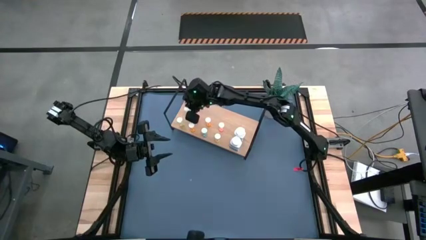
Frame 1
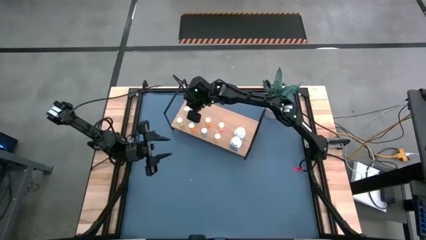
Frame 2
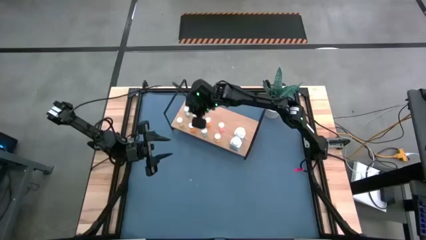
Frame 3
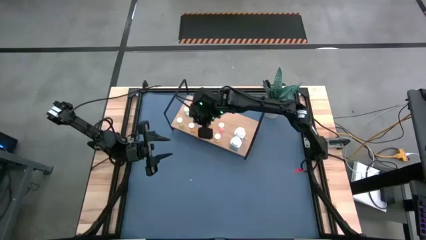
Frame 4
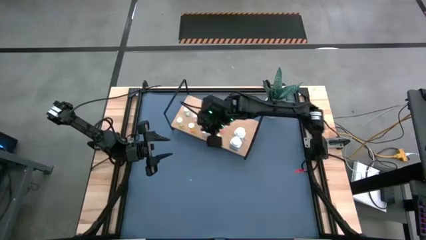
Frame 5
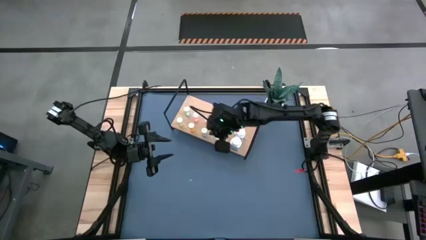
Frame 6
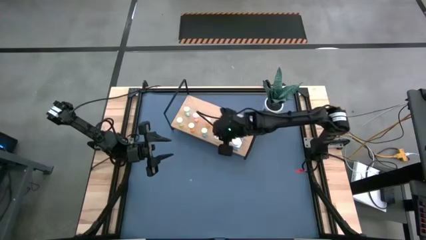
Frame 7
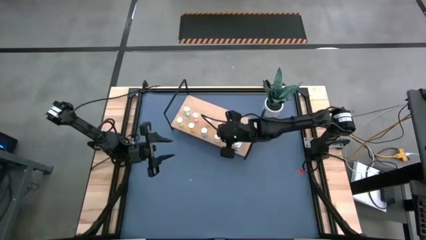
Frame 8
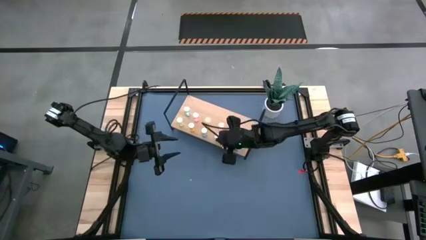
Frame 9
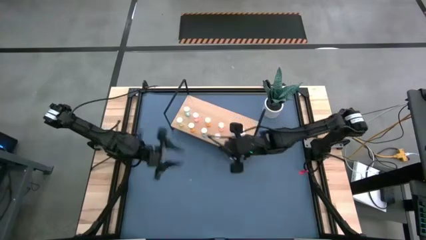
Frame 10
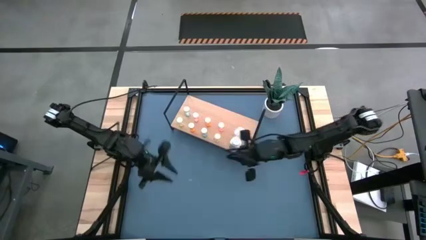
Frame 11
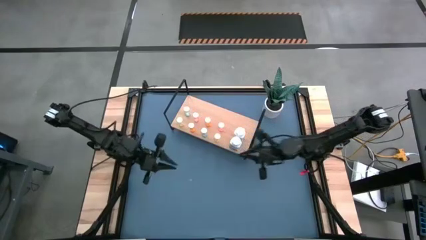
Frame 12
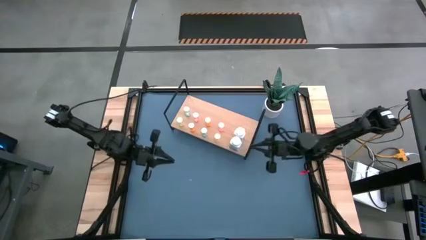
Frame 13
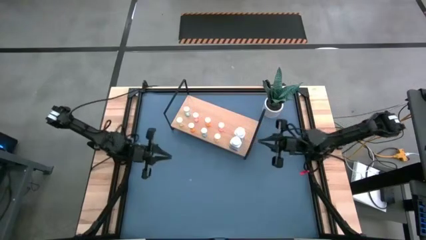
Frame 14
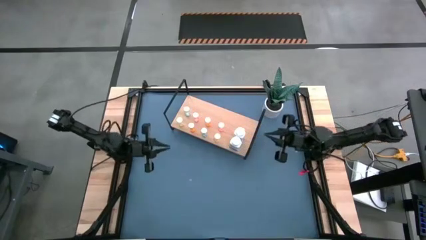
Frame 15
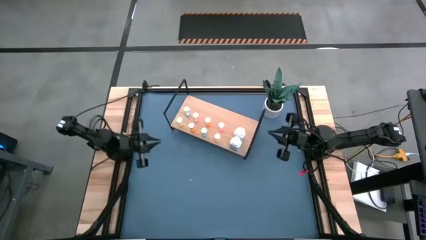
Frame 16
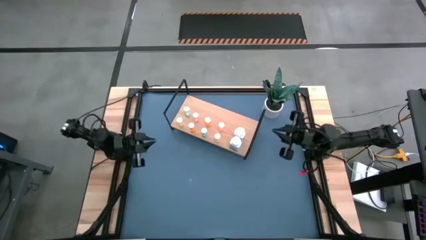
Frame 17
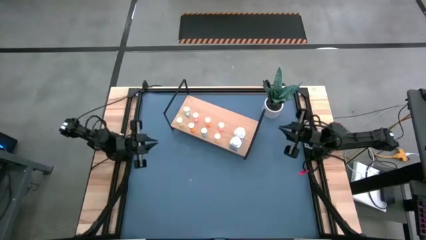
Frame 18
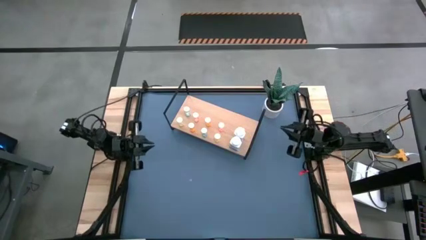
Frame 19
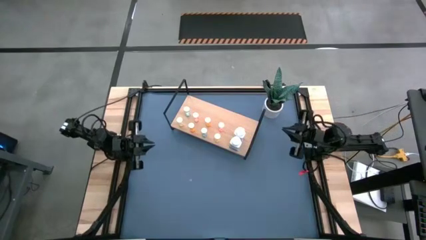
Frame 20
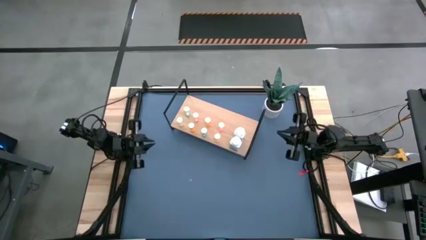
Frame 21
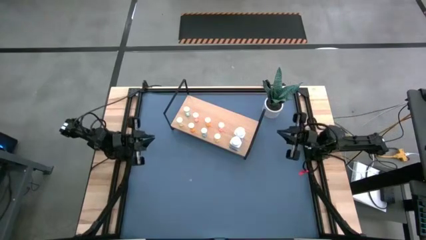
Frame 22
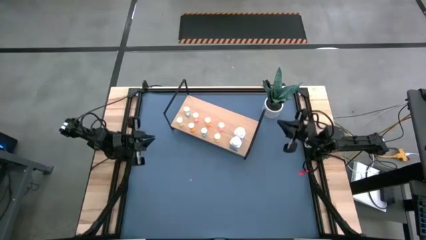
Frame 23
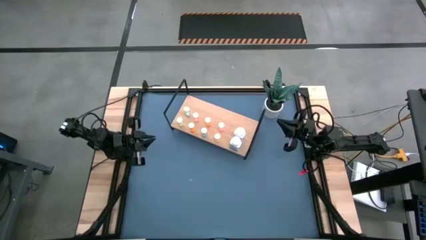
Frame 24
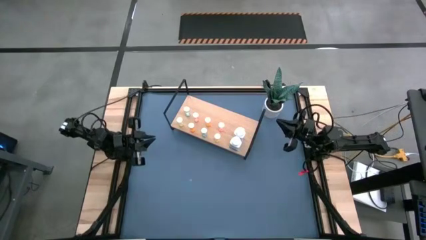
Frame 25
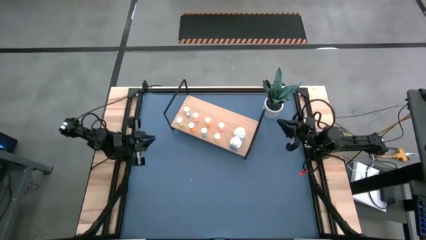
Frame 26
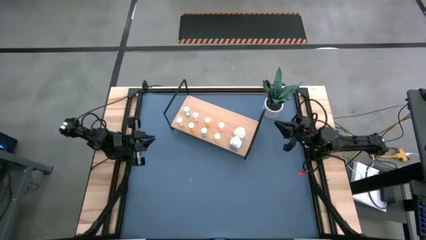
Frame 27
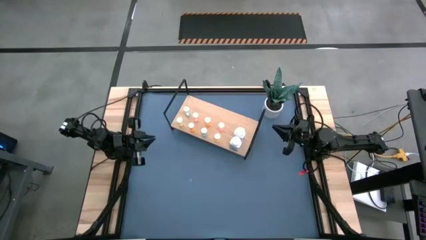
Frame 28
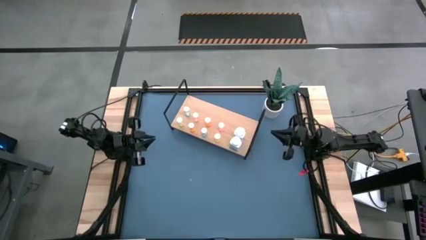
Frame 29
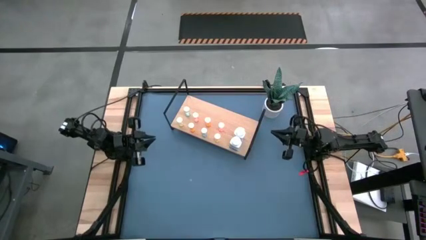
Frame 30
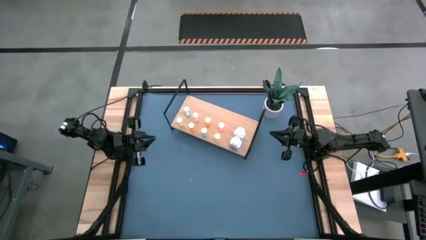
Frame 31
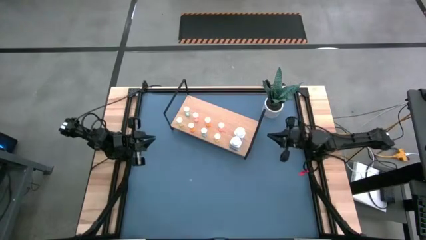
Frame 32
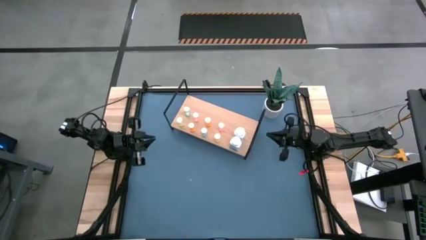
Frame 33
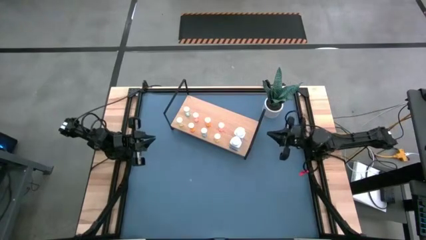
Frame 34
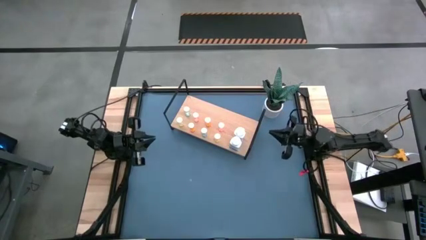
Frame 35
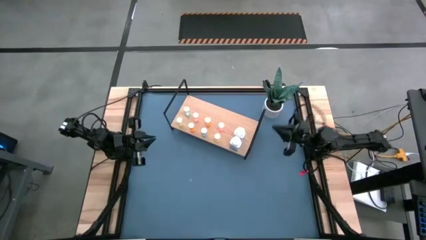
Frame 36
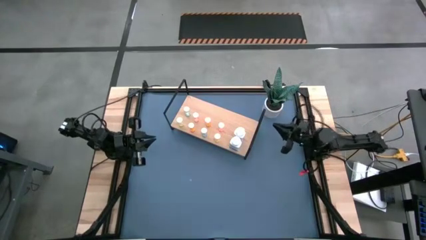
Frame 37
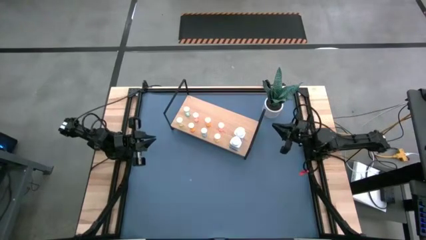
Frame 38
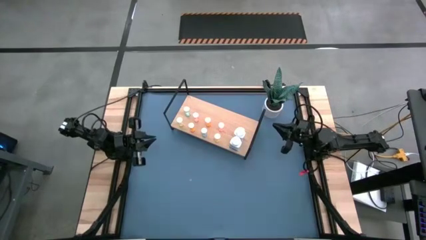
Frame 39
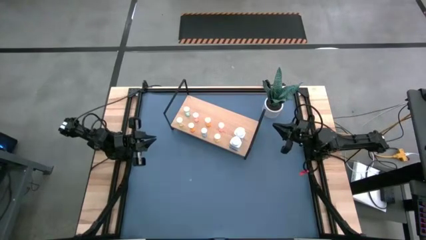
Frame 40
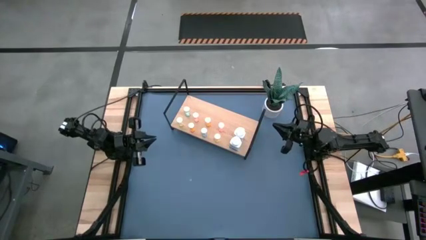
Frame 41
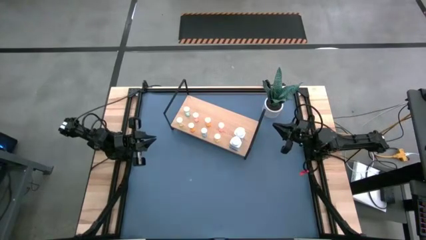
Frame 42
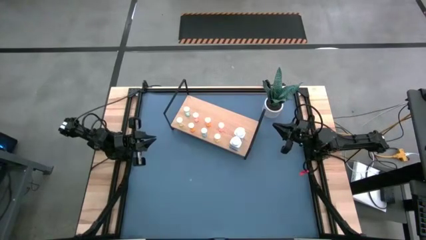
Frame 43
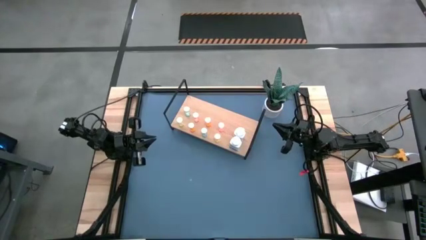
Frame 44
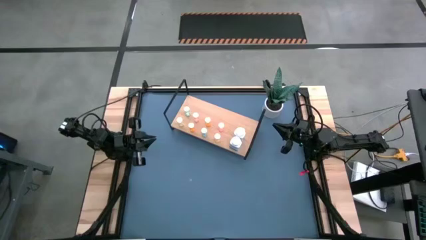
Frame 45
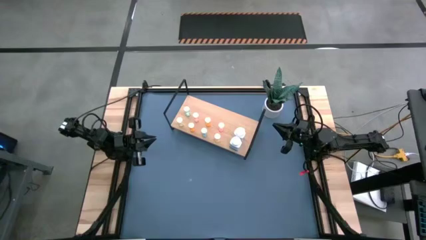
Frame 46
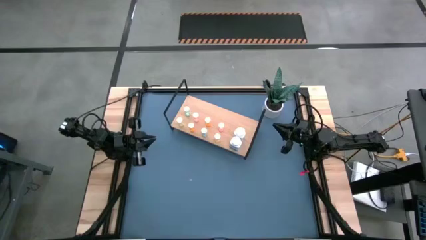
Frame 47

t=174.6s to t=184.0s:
Task: Pick and place medicine bottles onto shelf by color
Return to Home Position

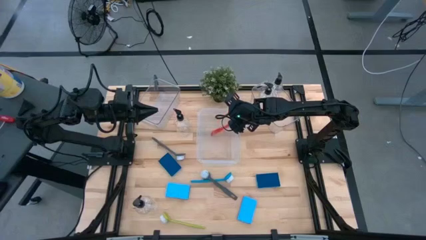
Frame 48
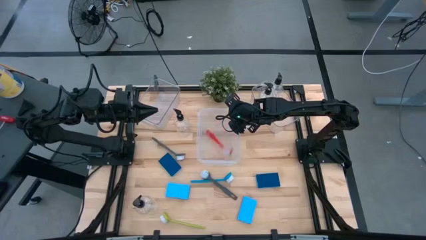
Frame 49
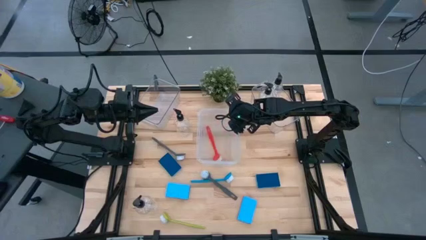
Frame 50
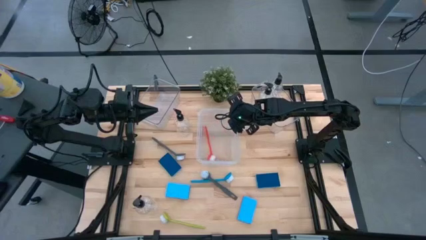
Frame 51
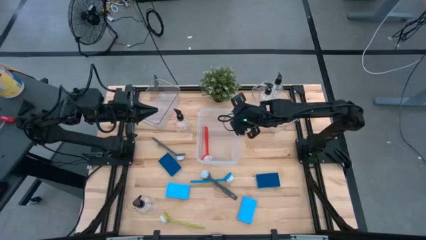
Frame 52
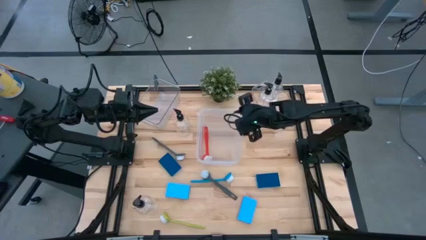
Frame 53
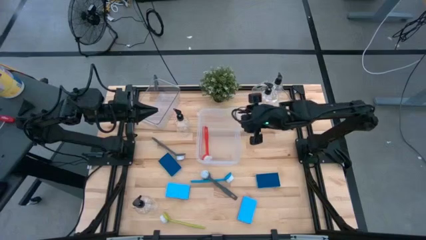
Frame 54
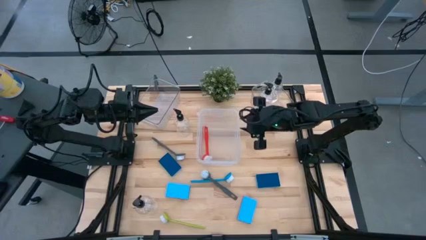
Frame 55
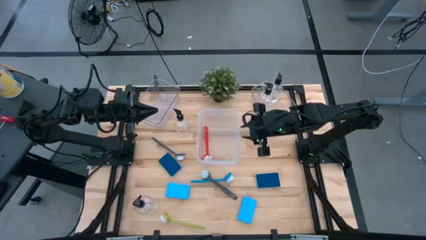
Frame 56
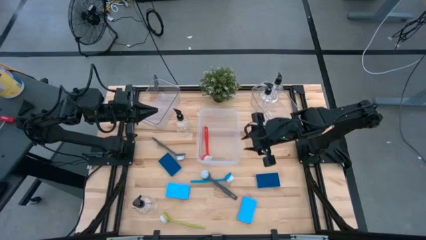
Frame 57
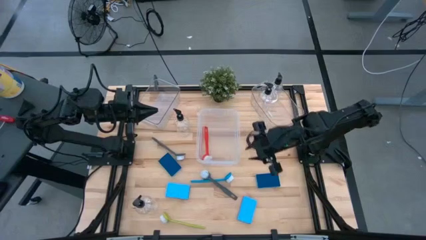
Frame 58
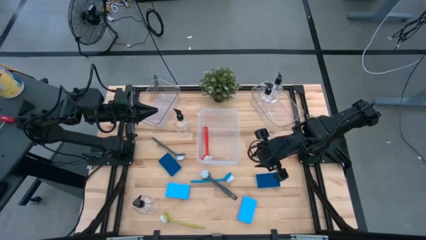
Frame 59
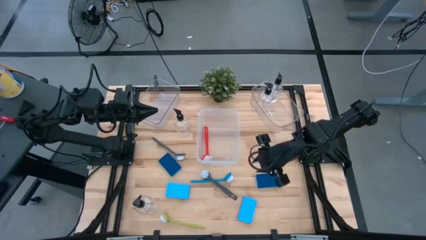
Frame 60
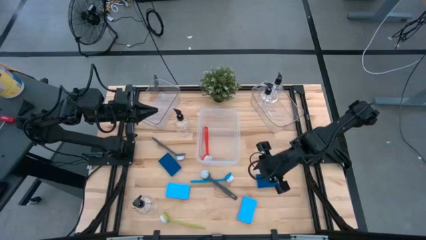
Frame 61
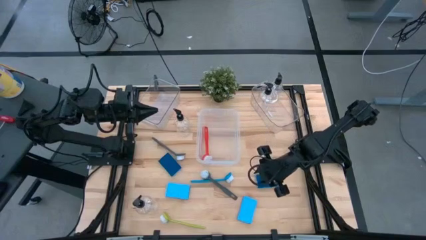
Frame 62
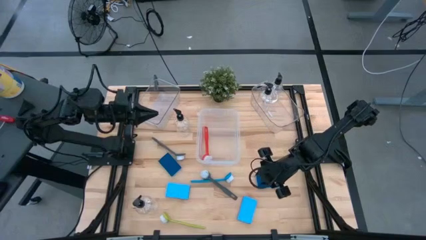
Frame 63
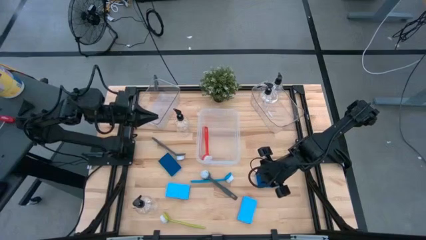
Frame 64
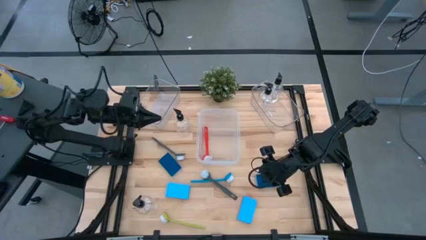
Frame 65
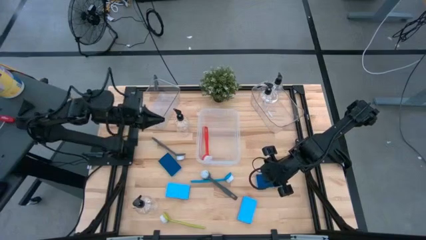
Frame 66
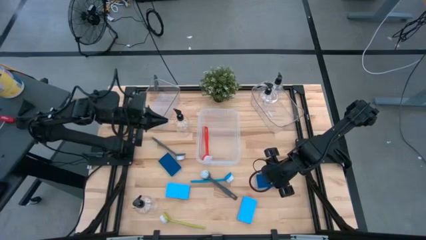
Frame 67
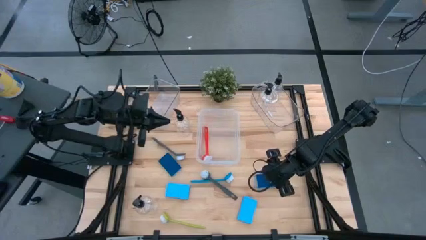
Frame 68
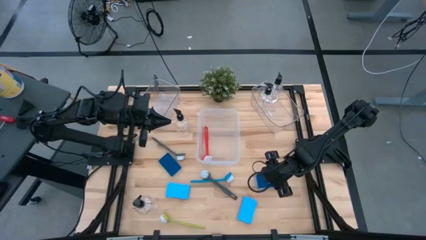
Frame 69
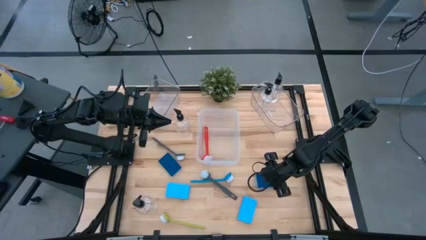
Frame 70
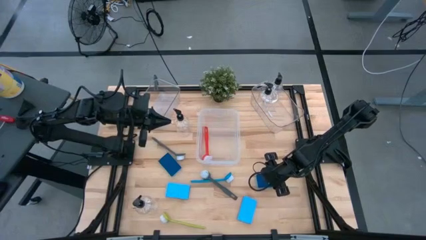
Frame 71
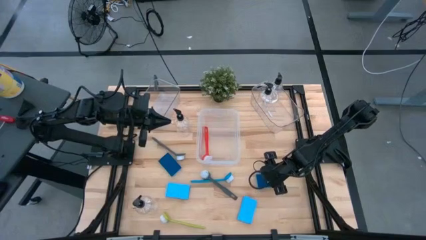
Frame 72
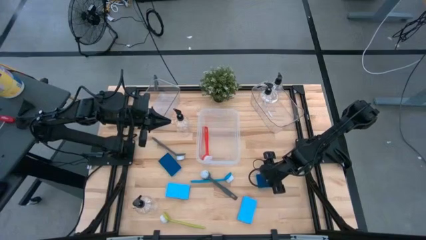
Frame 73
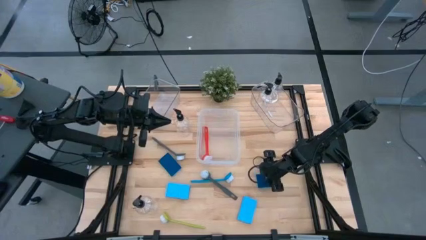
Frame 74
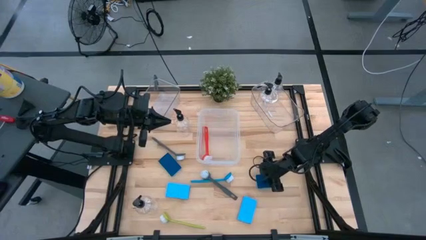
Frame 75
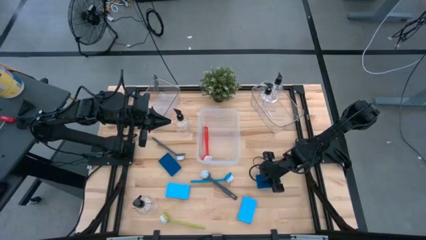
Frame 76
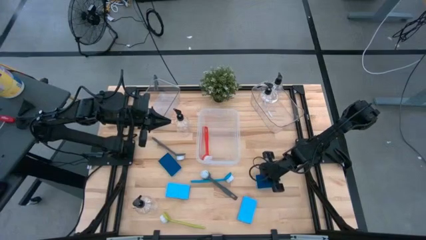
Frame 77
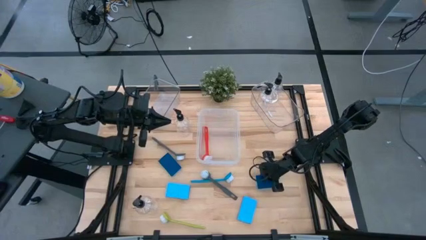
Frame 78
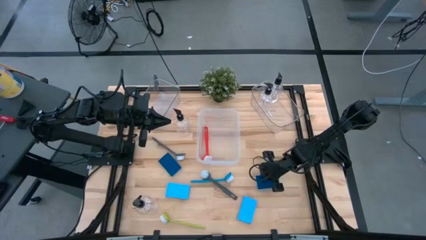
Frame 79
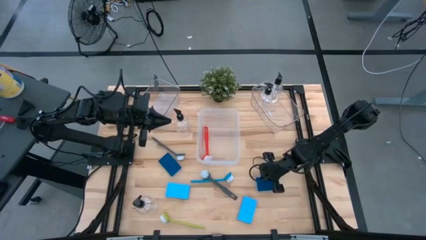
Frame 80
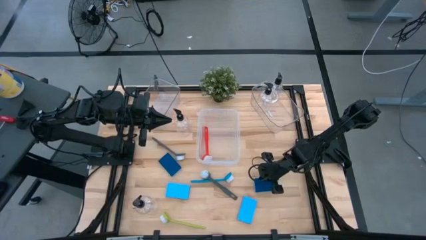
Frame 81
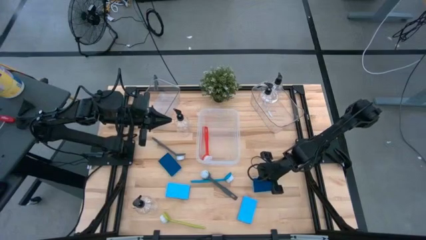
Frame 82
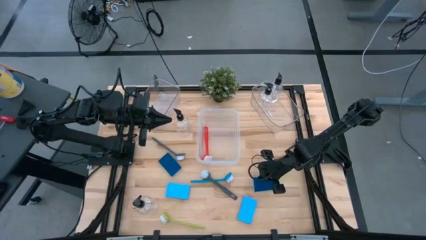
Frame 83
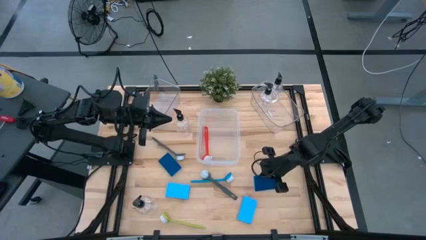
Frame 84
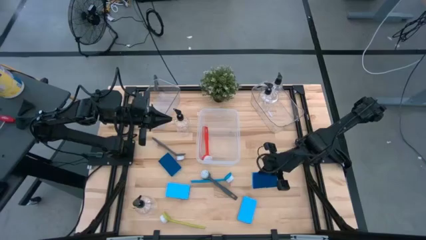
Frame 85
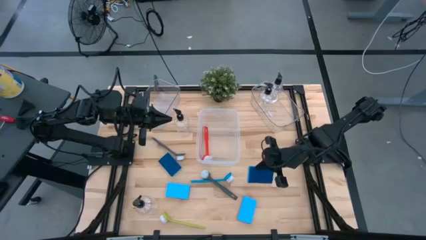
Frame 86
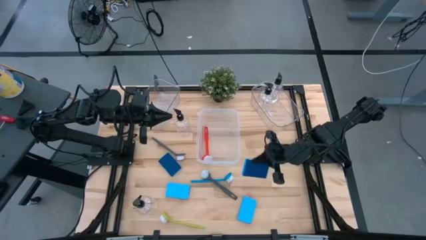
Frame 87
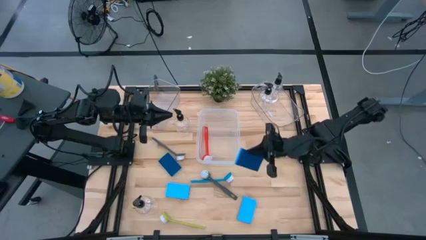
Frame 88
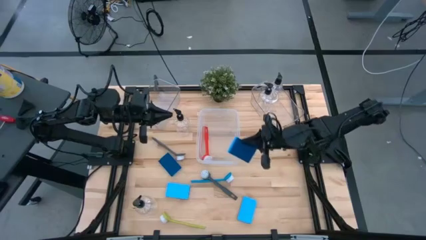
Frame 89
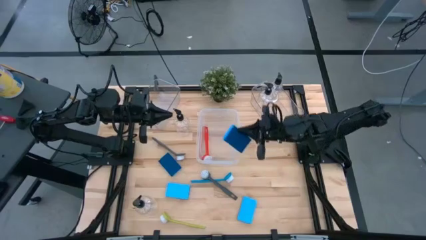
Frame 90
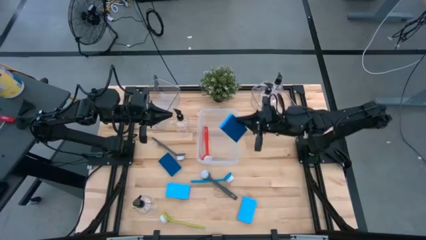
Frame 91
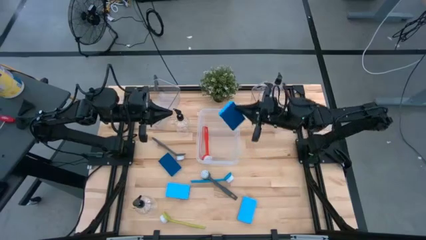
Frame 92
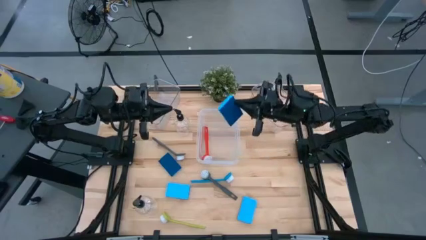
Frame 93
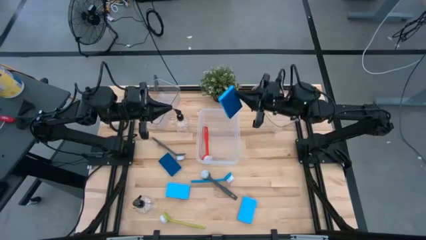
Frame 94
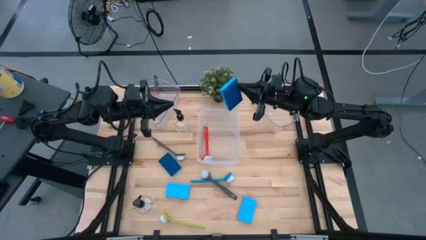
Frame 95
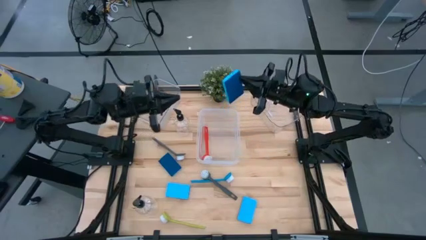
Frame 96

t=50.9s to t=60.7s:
Task: Pick & Place Kitchen Sink Supplies
Put the blue sponge in the left transparent bin
